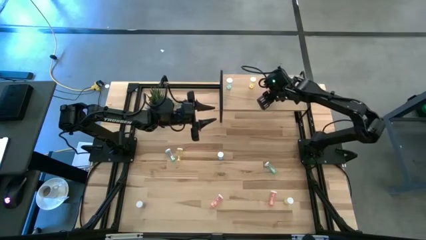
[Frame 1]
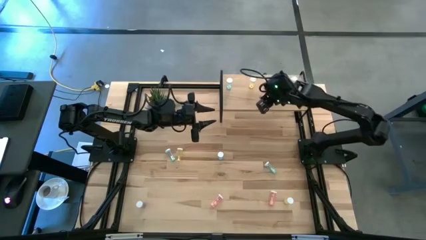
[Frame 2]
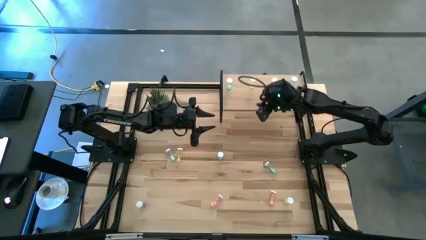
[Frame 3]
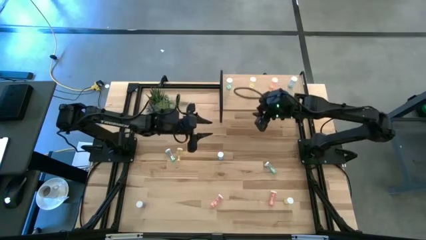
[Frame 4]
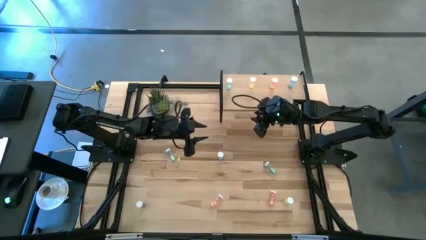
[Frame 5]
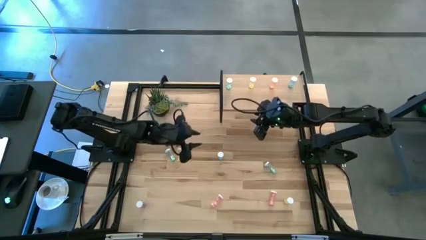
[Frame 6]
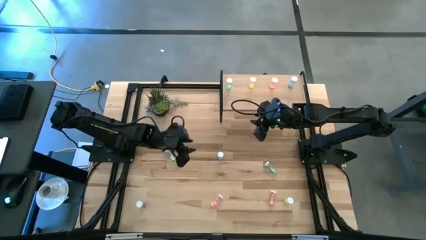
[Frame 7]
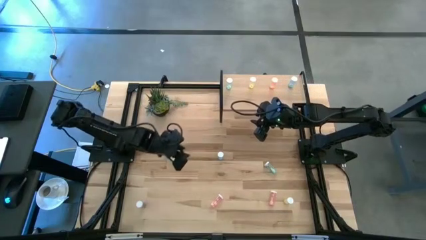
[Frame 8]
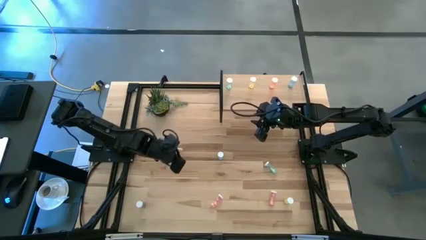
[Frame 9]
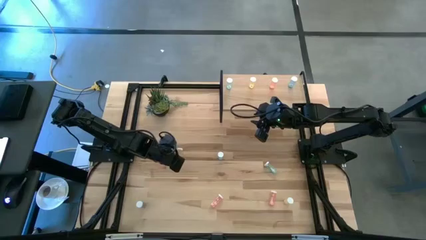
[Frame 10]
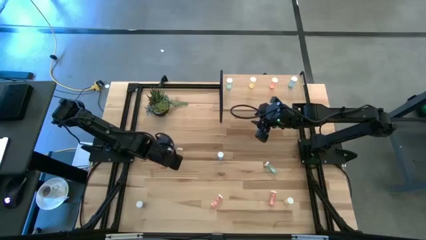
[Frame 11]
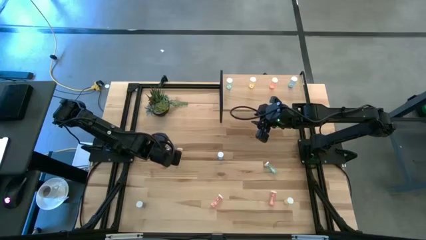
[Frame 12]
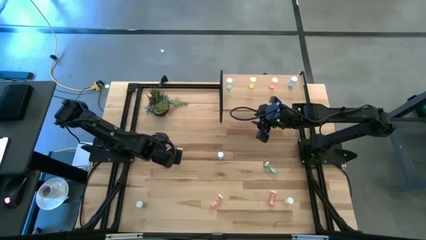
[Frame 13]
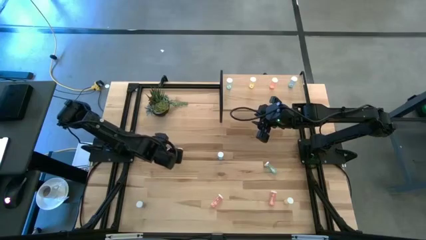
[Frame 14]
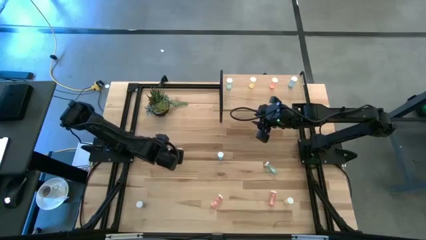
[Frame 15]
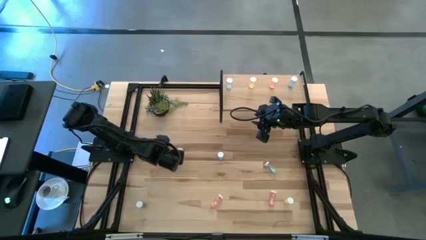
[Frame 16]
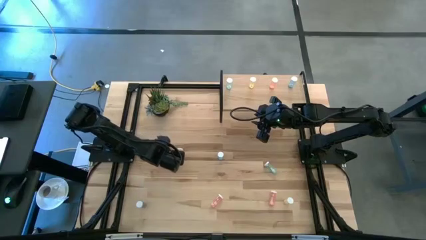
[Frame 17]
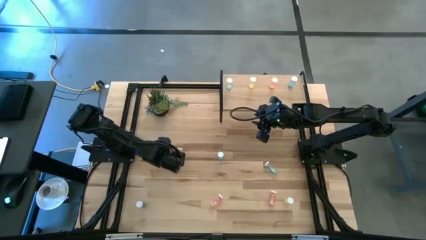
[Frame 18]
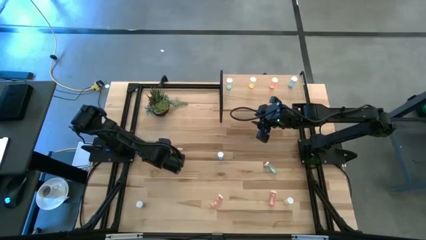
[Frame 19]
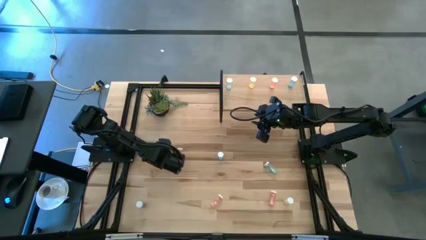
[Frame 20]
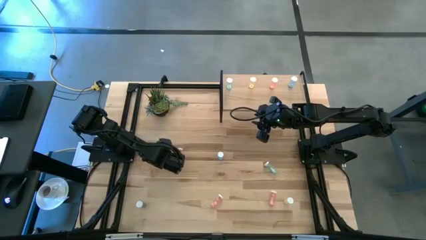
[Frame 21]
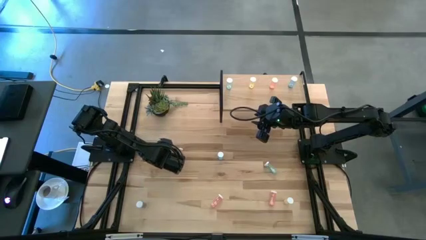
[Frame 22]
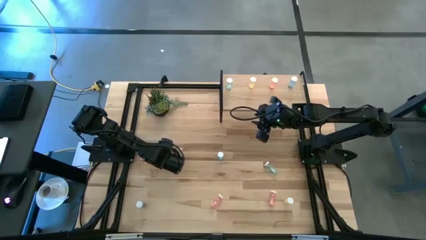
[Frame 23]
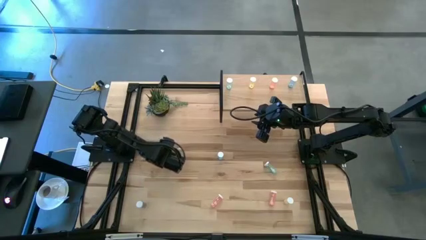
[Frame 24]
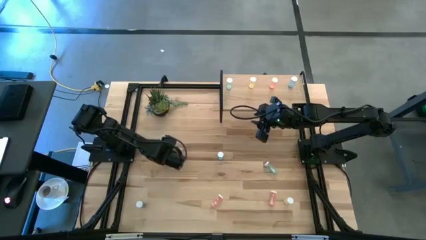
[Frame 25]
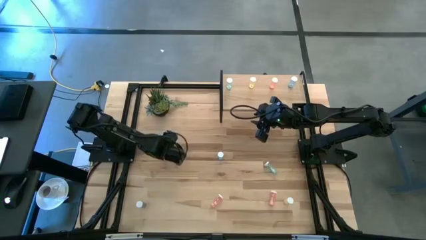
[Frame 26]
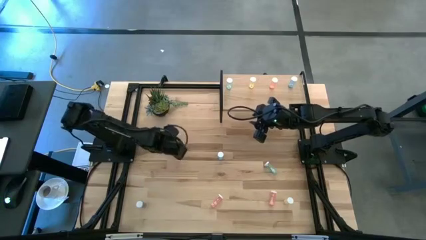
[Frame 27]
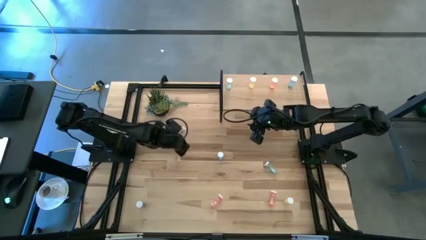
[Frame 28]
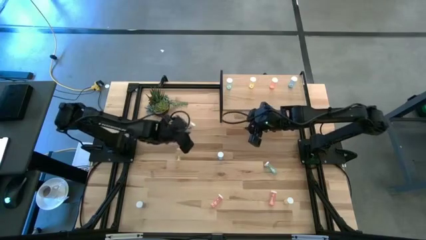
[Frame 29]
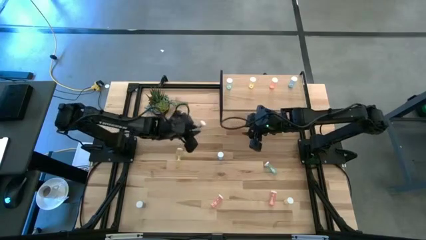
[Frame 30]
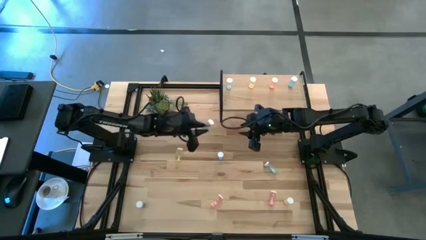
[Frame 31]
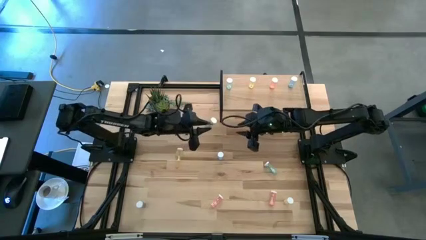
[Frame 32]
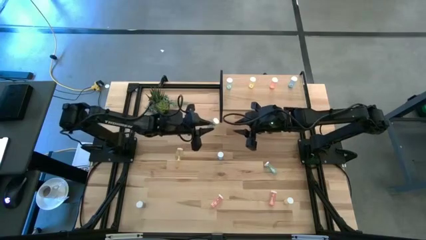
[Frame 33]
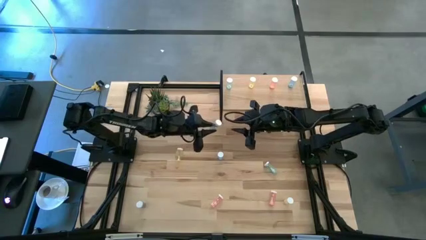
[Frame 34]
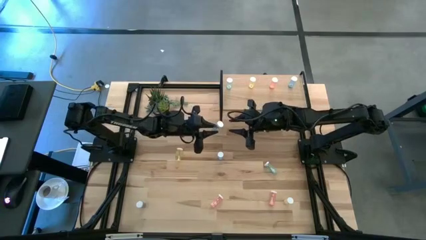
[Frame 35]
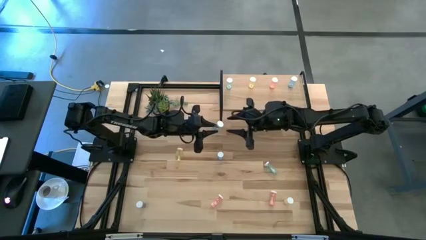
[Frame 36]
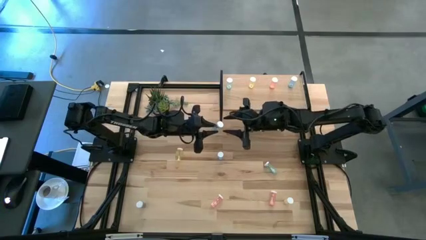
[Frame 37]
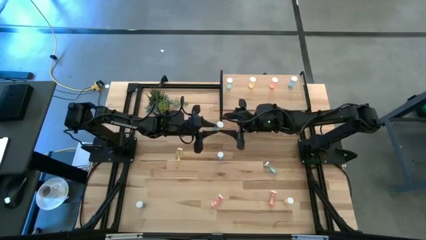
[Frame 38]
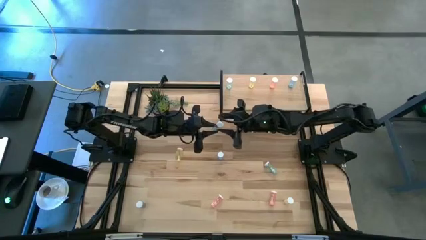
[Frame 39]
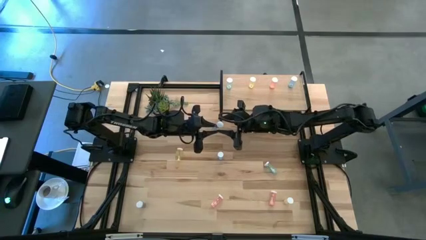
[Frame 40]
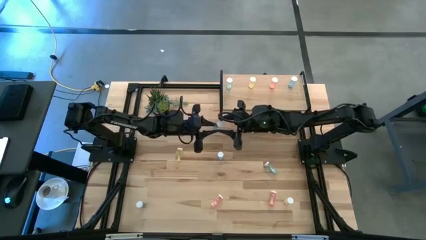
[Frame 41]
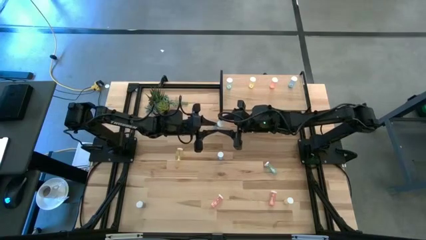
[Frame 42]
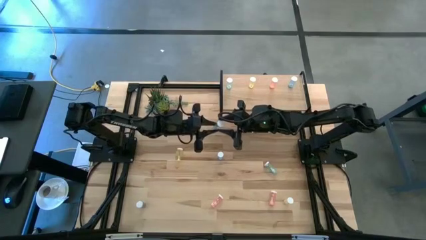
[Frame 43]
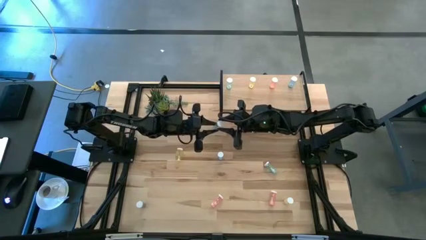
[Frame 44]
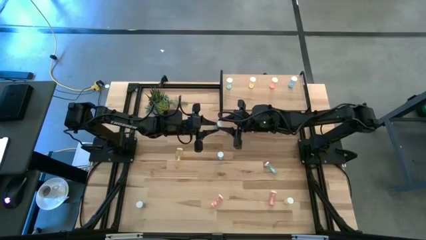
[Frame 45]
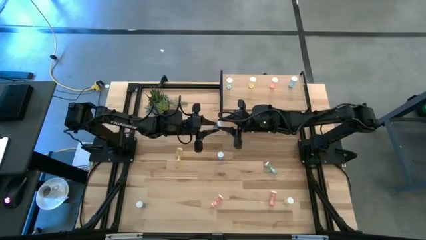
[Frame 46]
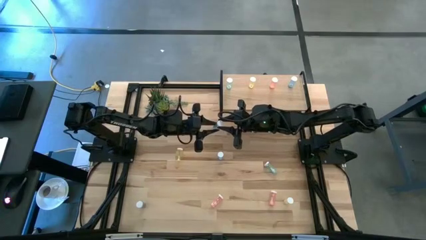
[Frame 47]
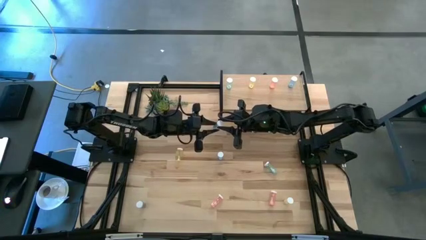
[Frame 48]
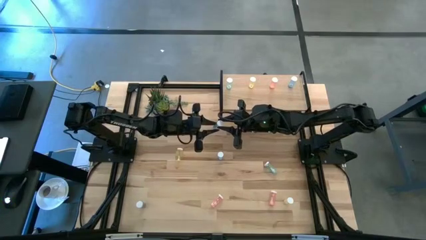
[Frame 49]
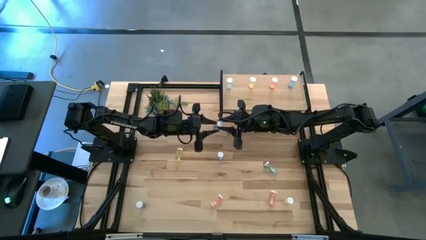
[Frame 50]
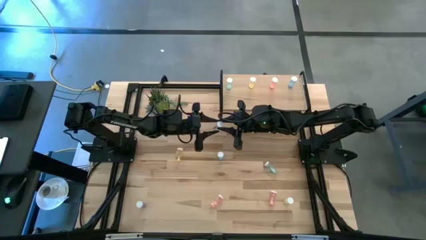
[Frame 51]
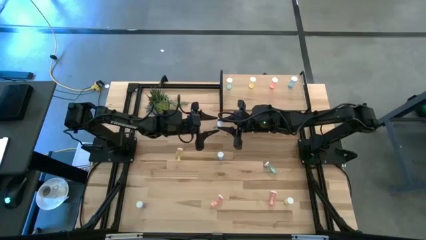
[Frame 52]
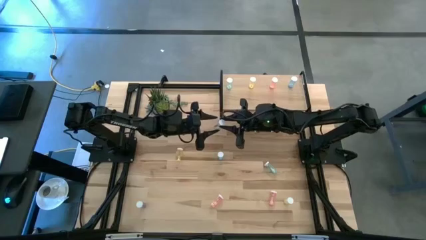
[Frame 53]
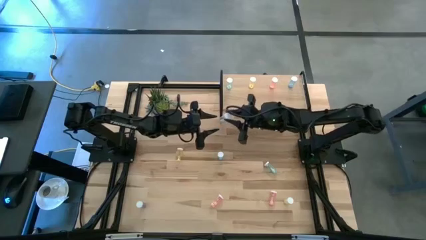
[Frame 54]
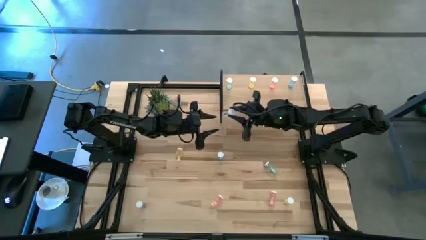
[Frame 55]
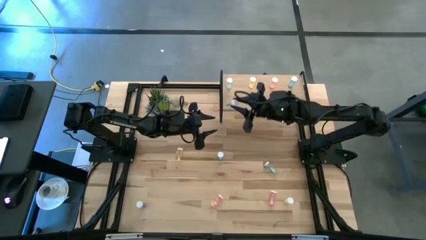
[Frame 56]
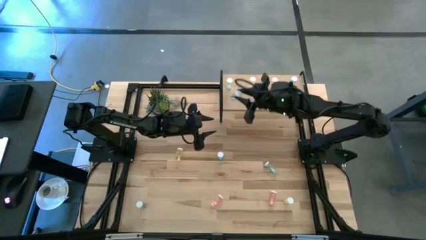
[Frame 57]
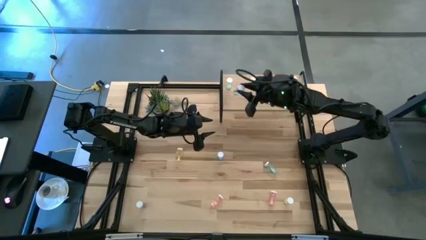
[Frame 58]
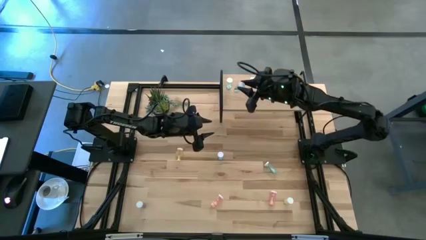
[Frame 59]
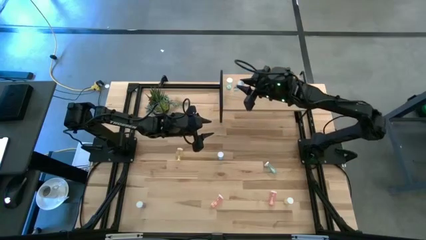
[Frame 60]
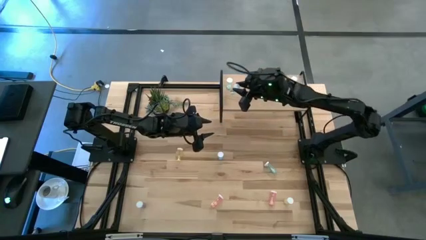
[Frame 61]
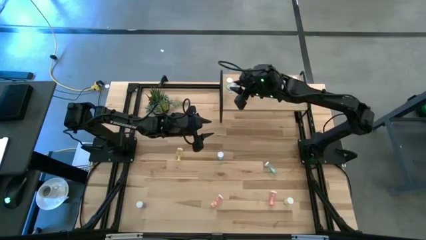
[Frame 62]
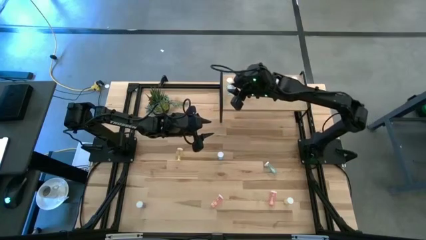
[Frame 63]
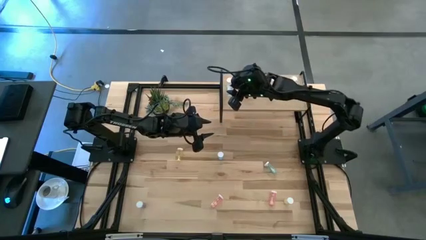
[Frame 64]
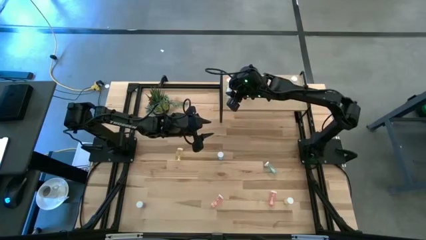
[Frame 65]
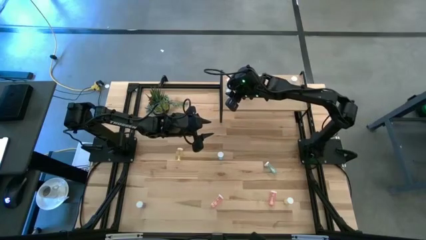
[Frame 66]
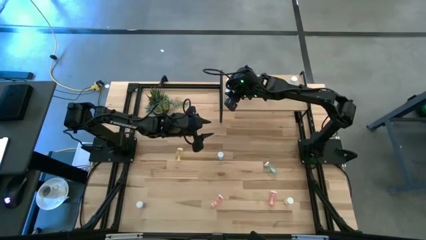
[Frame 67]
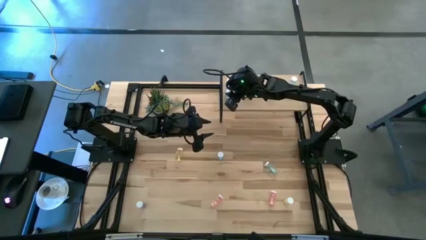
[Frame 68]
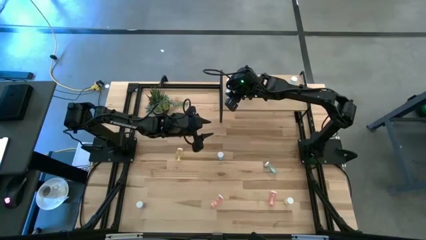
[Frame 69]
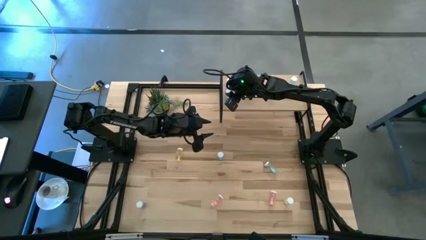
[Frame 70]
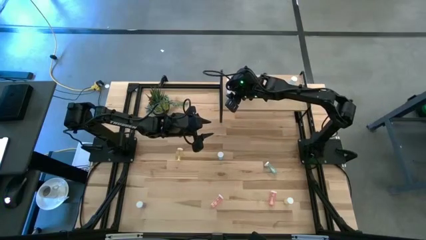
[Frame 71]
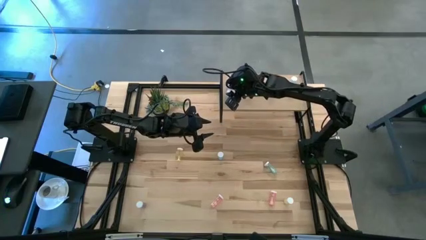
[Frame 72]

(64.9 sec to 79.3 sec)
Task: Pick and place medicine bottles onto shelf by color
Put the light blue pill bottle aligned with the other light blue pill bottle on the shelf
